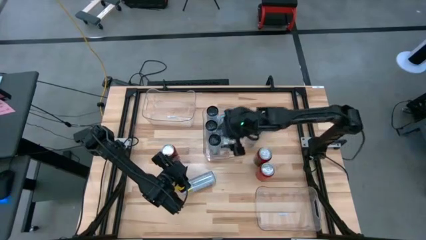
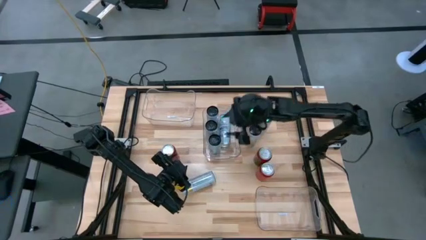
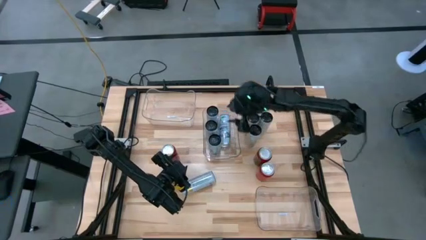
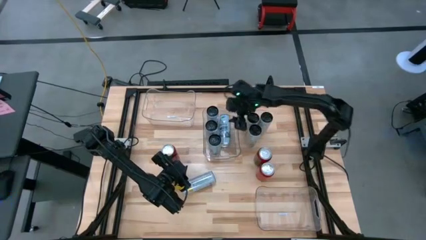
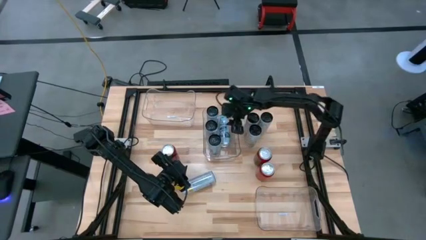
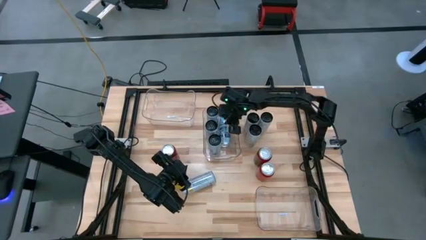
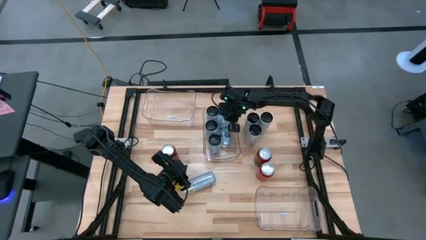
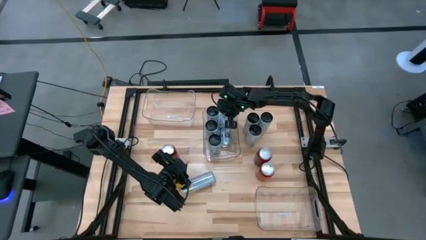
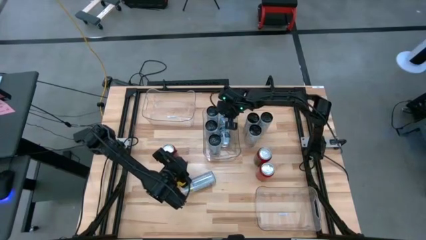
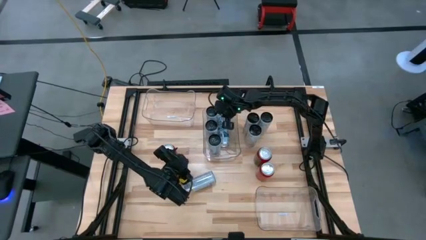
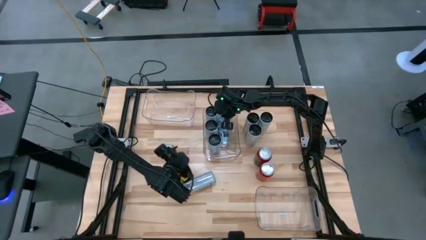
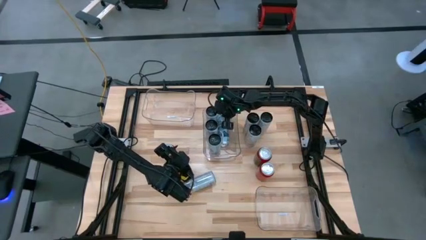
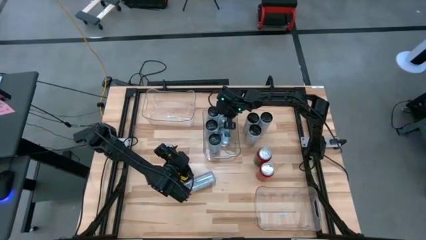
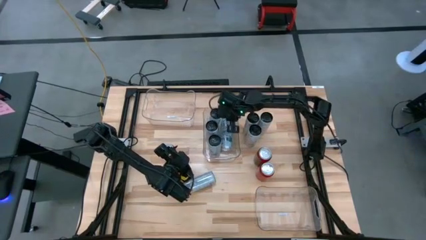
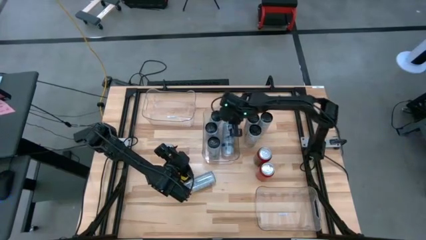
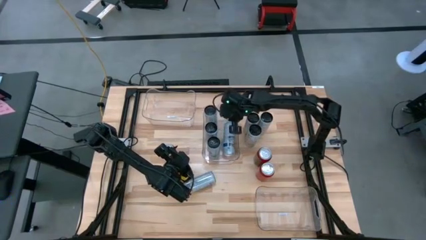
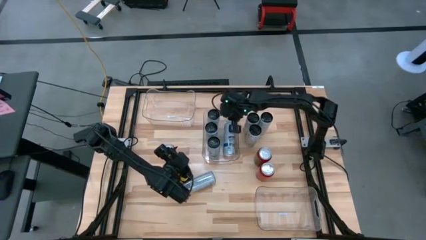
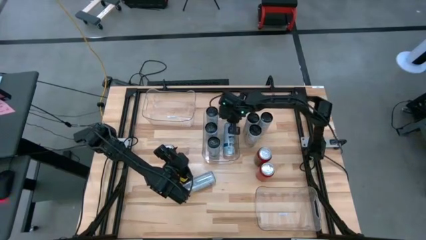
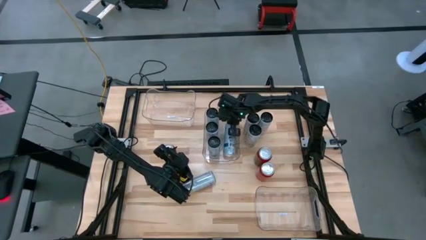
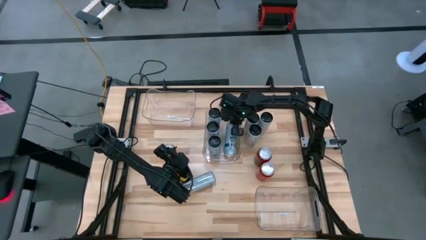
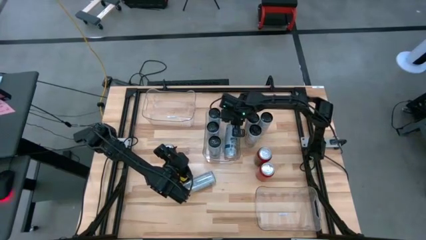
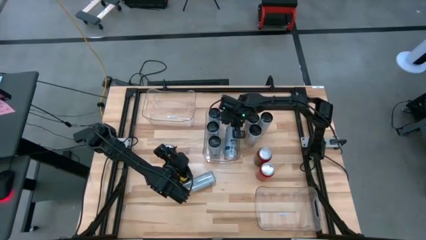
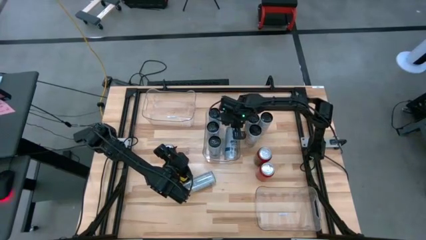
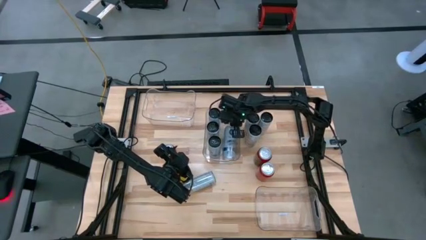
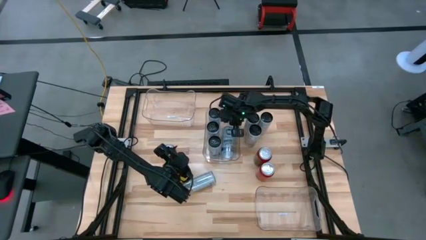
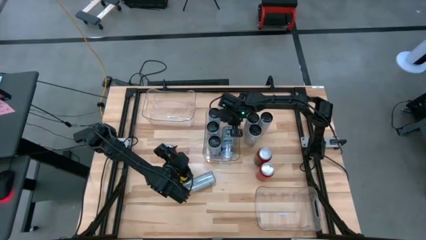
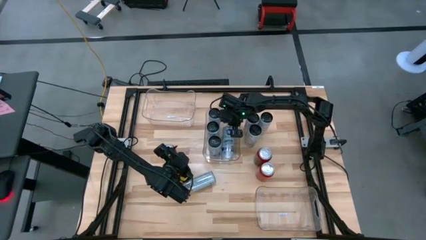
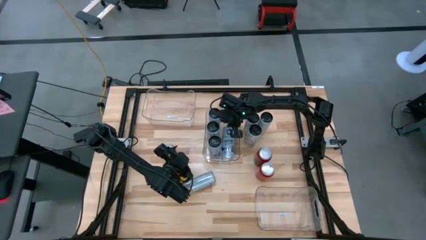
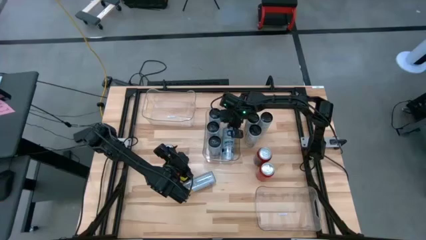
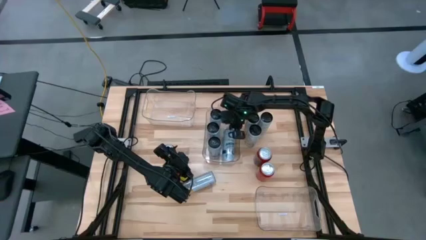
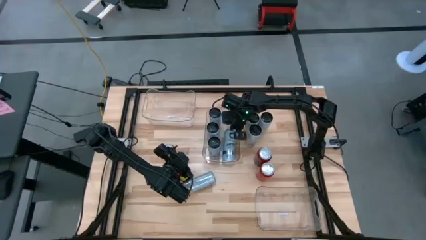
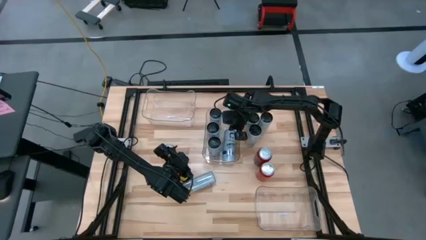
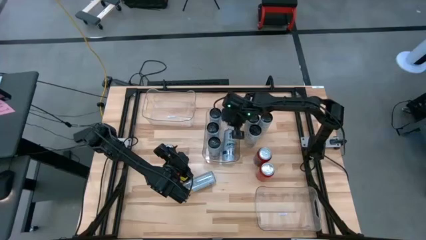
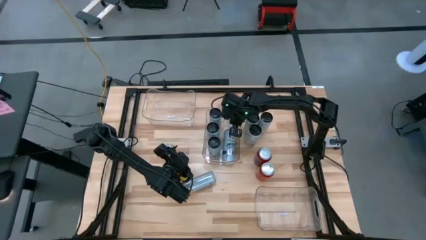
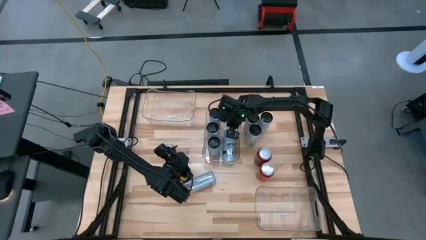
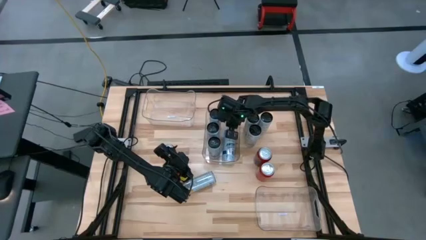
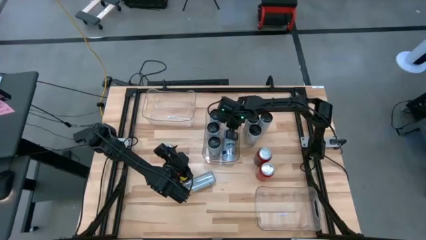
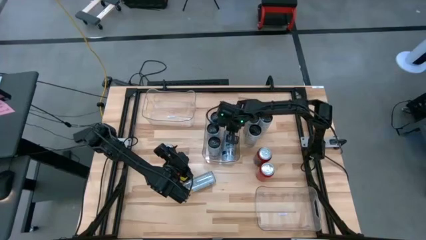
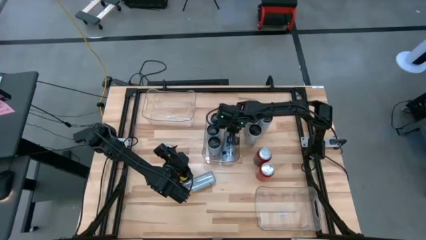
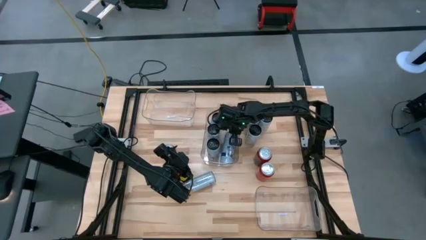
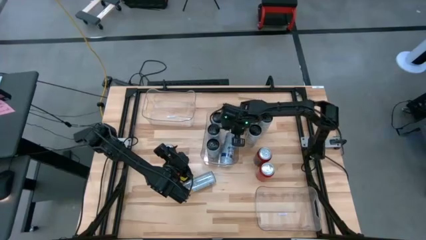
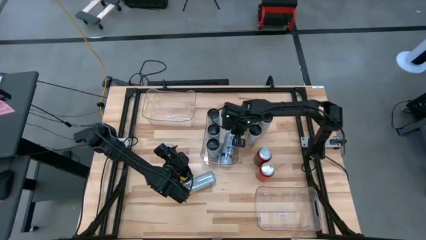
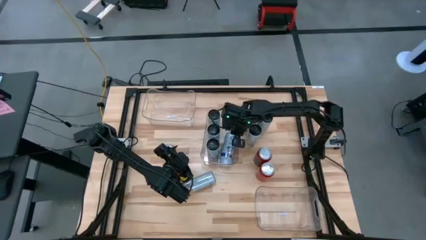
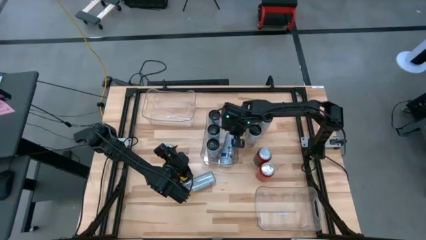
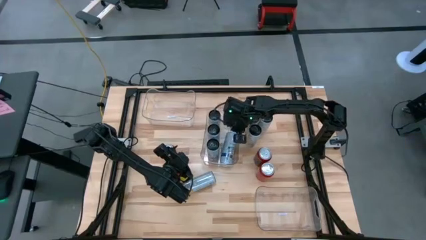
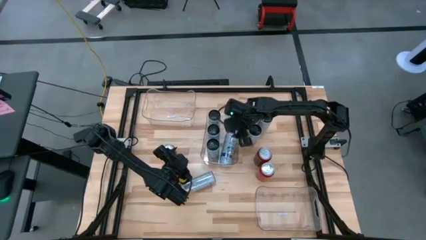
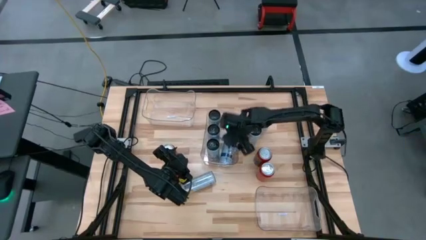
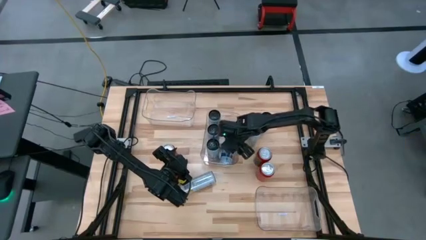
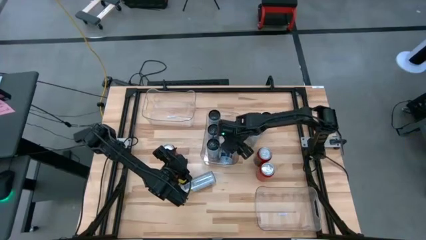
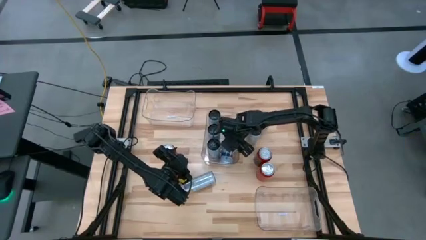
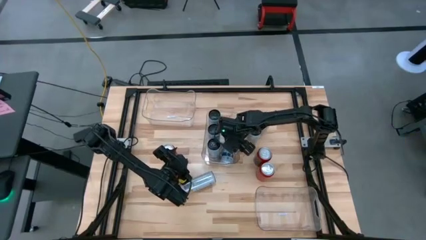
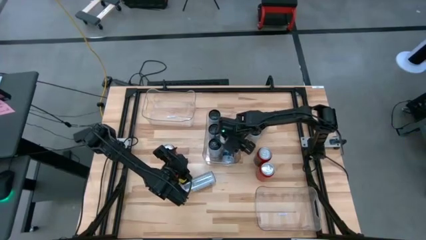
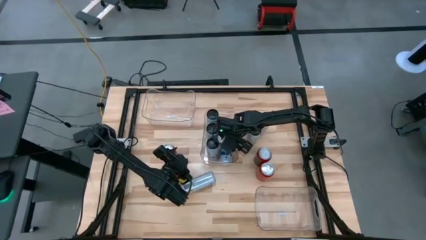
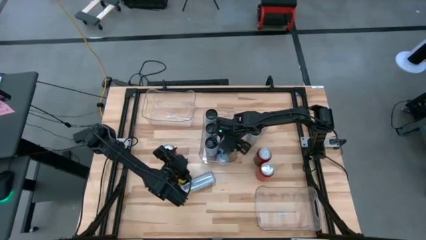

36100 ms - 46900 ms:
Task: Sort soda cans
Adjust the white blue soda can

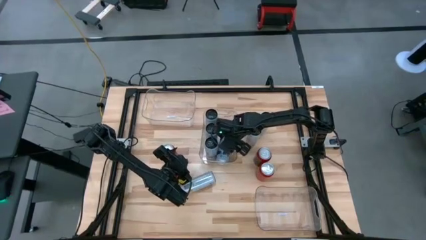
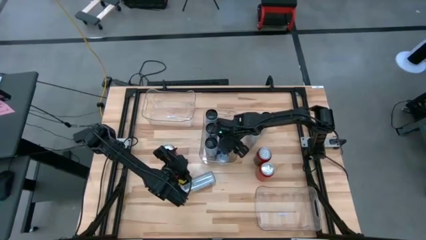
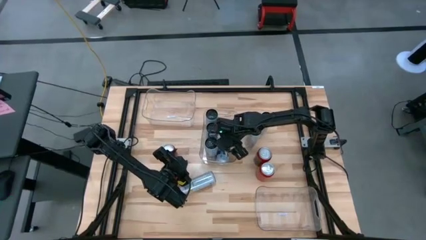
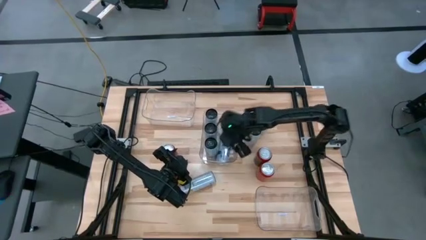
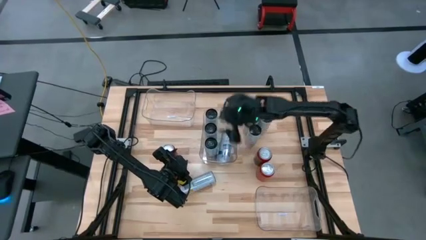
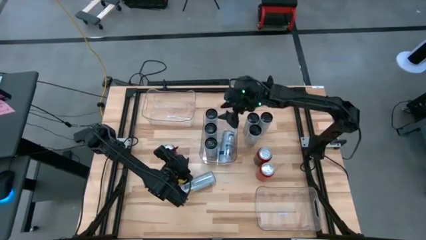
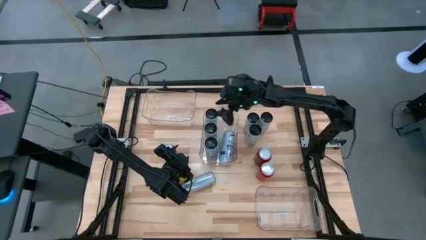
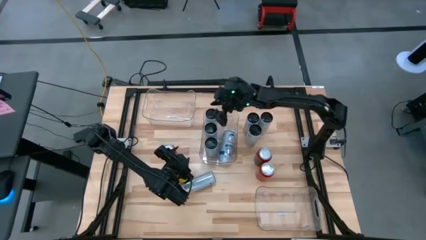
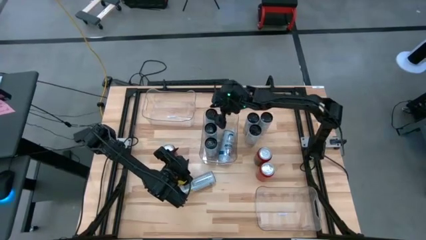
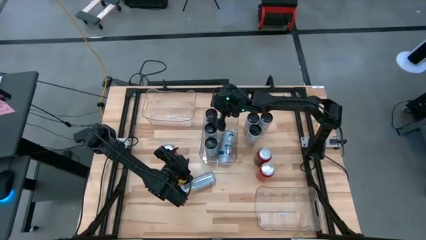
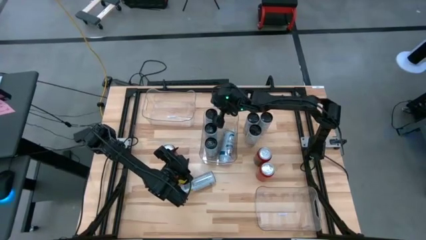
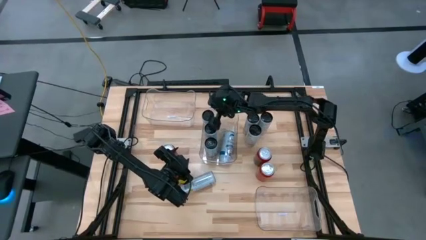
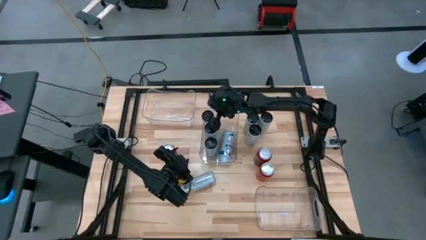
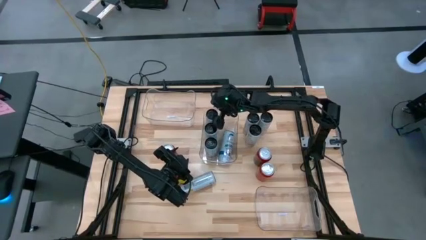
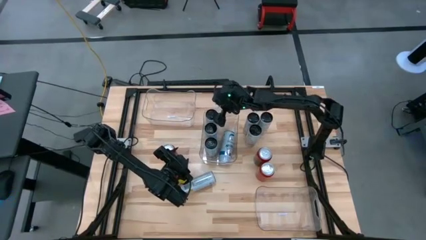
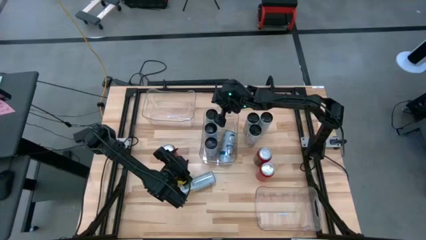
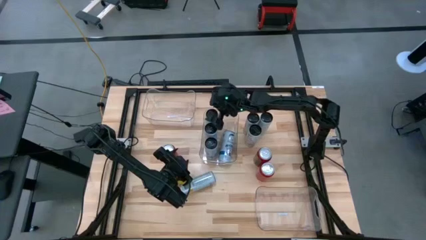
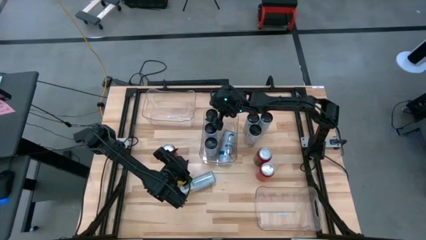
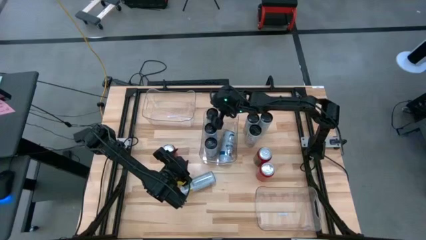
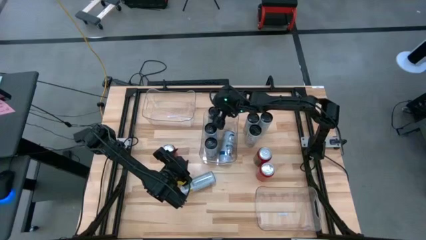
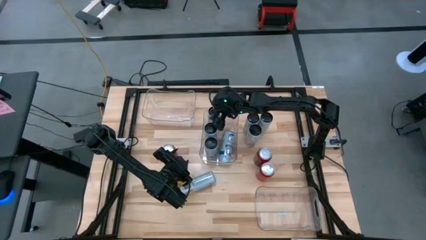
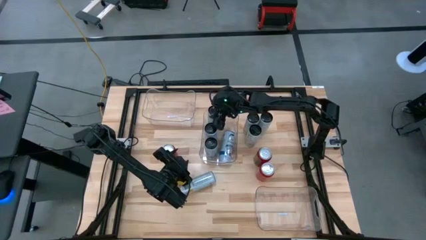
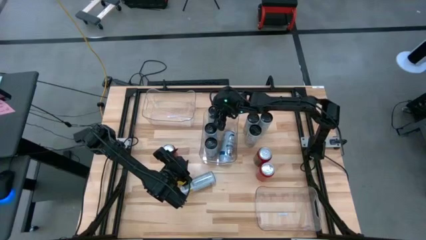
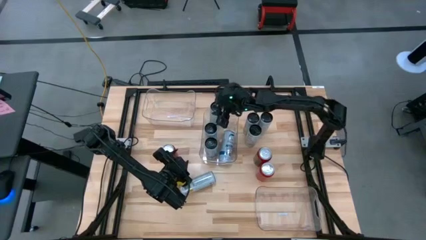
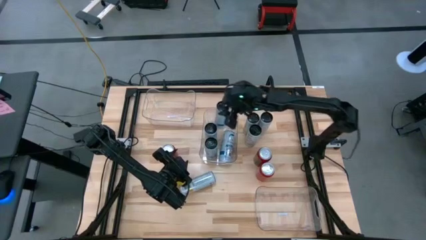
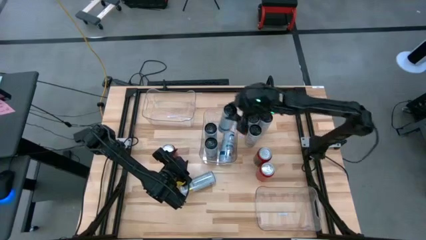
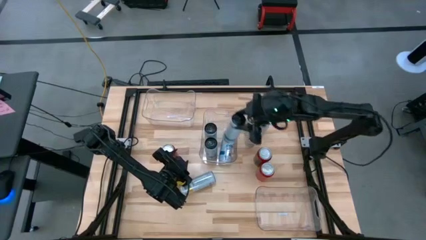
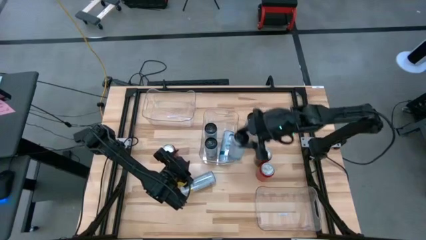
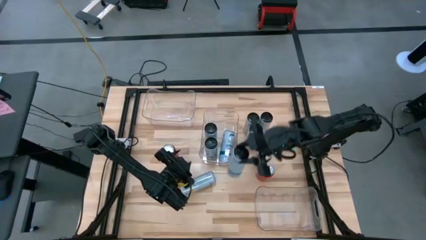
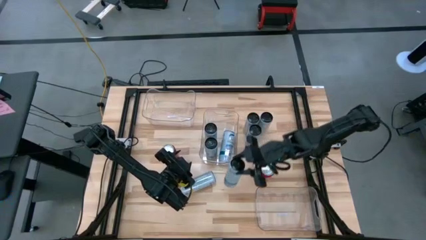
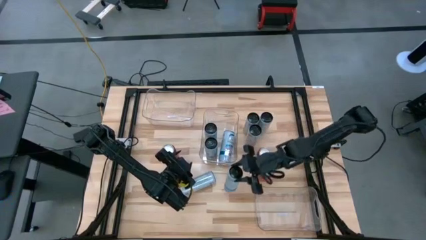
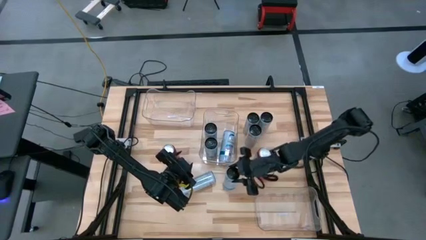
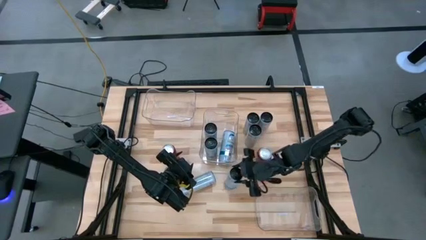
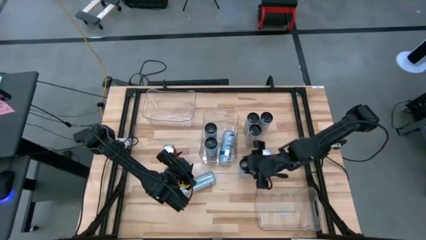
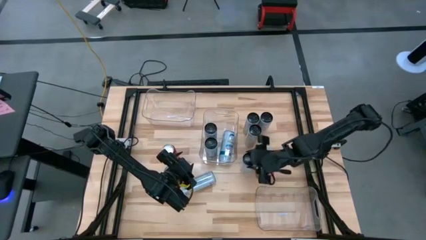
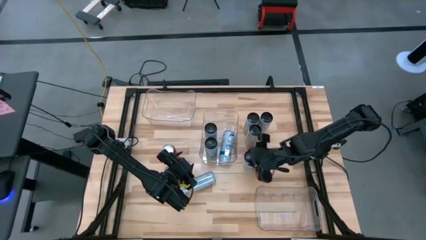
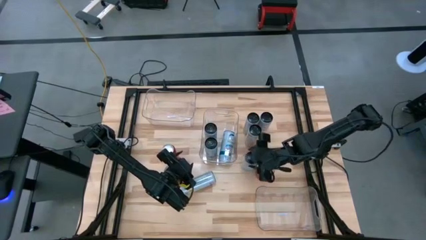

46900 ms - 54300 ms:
Remove the white blue soda can from the middle transparent bin
